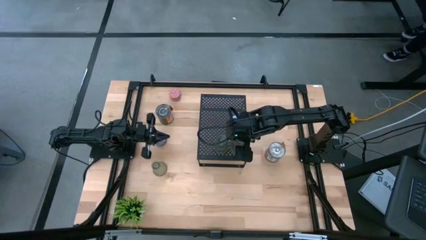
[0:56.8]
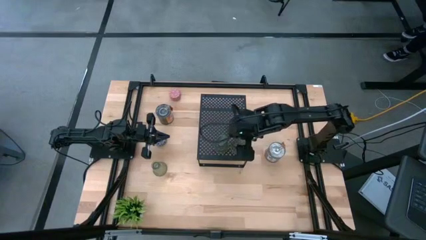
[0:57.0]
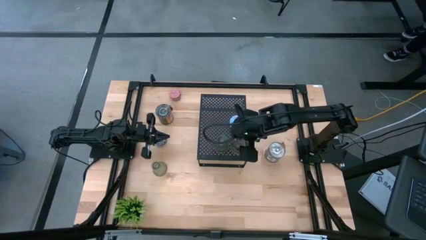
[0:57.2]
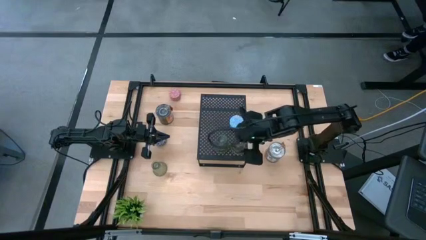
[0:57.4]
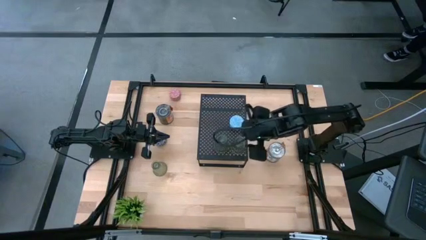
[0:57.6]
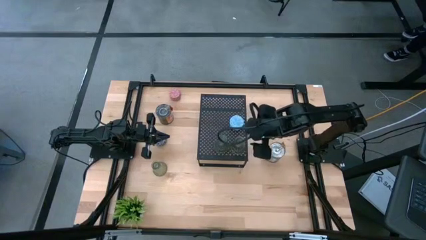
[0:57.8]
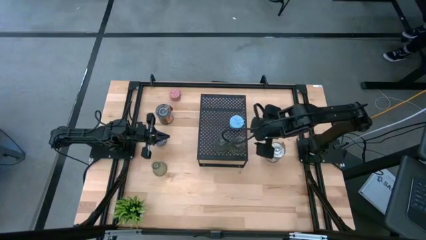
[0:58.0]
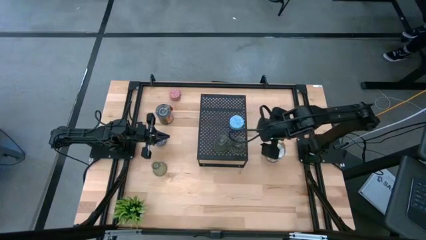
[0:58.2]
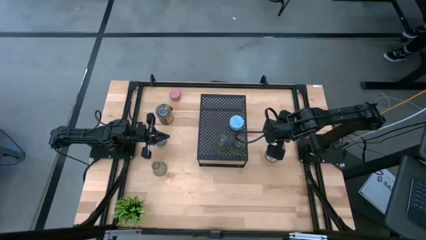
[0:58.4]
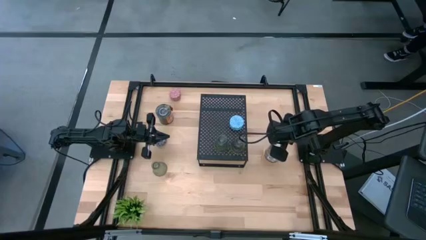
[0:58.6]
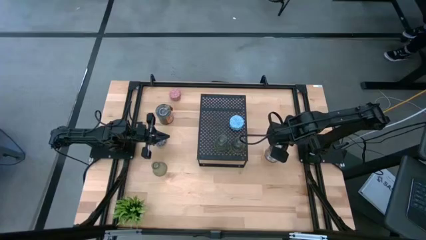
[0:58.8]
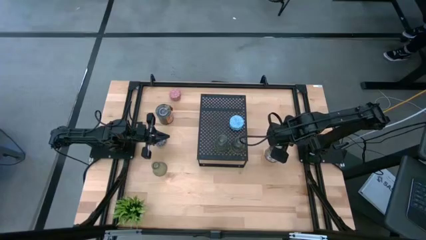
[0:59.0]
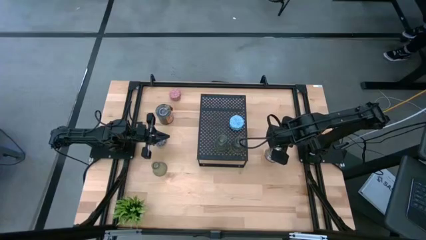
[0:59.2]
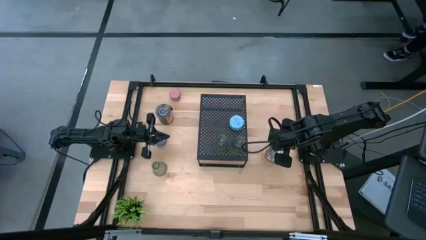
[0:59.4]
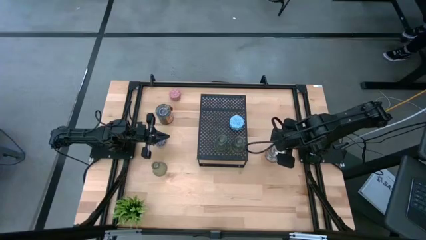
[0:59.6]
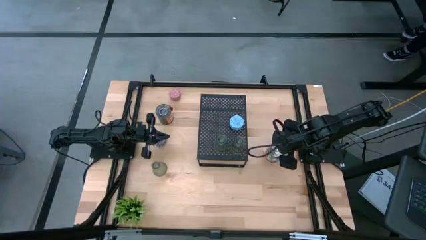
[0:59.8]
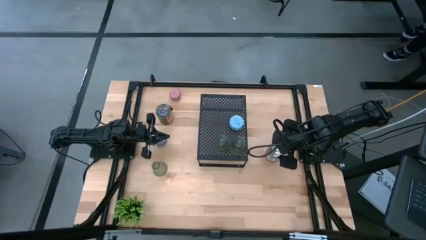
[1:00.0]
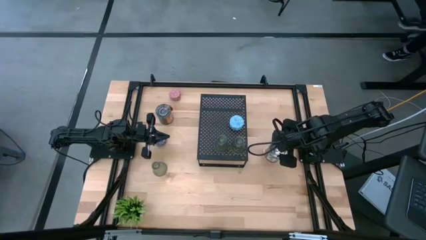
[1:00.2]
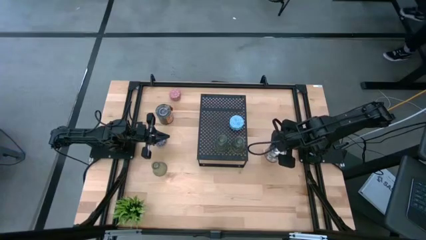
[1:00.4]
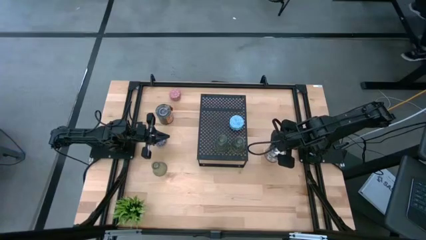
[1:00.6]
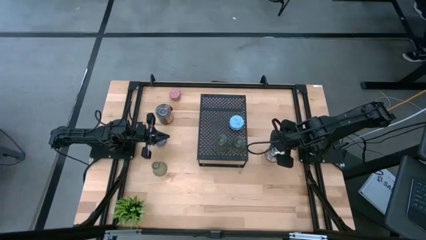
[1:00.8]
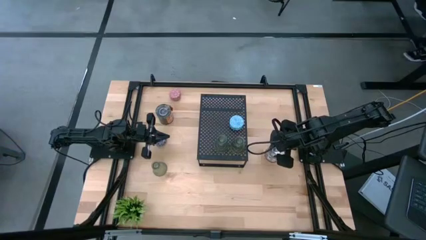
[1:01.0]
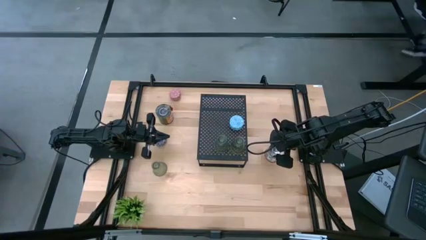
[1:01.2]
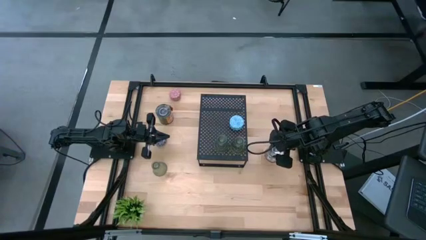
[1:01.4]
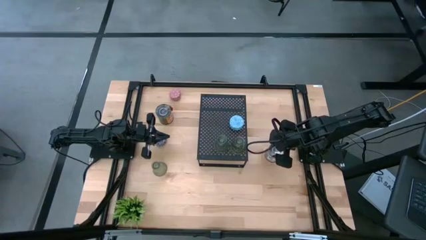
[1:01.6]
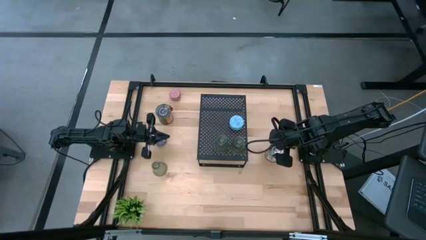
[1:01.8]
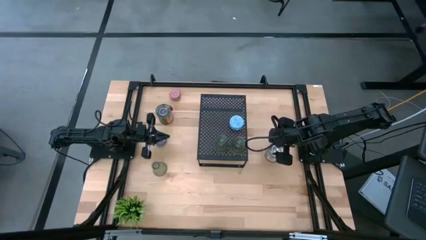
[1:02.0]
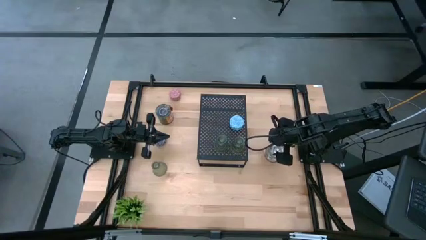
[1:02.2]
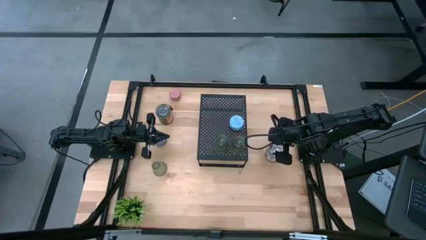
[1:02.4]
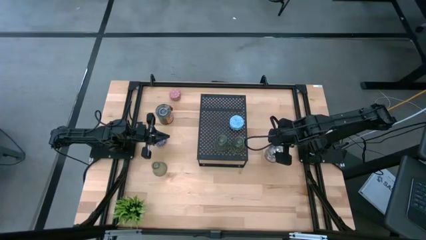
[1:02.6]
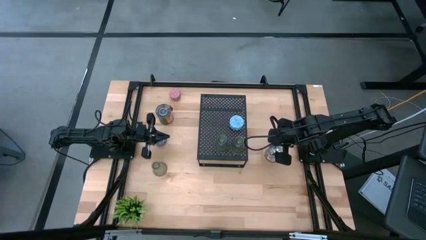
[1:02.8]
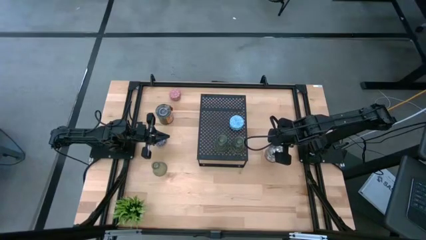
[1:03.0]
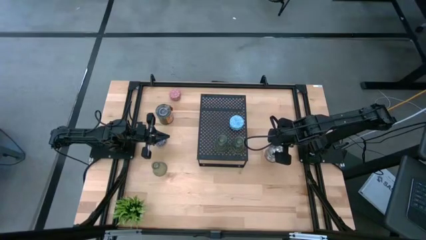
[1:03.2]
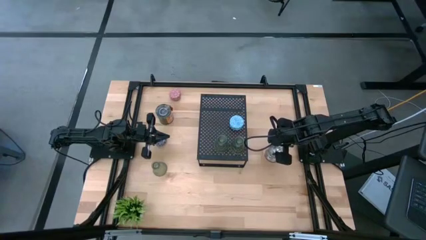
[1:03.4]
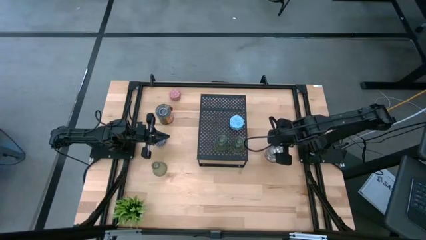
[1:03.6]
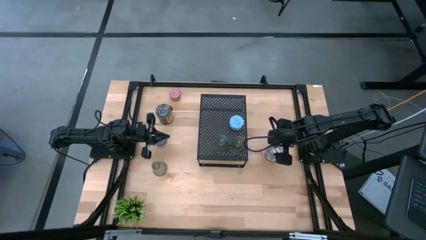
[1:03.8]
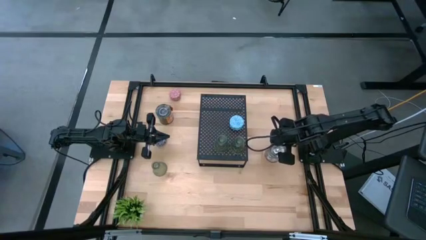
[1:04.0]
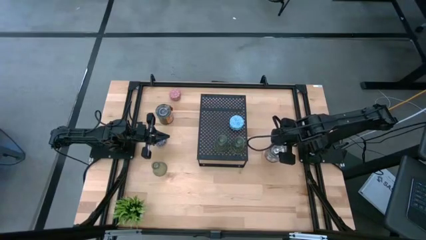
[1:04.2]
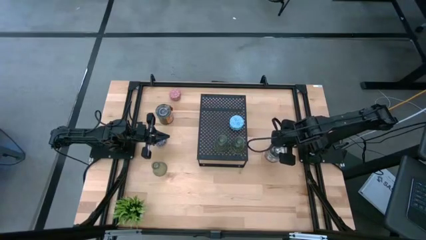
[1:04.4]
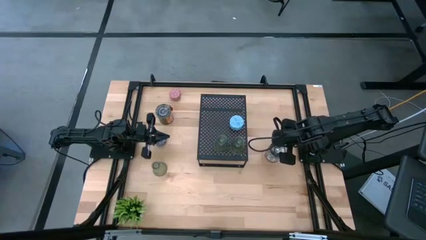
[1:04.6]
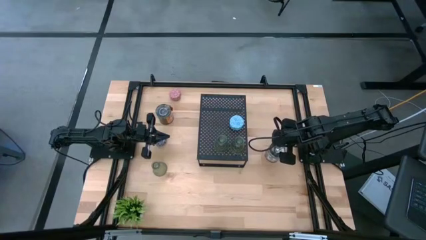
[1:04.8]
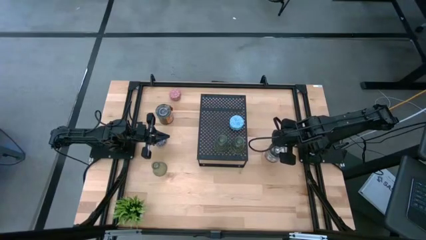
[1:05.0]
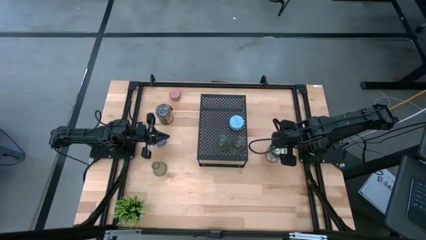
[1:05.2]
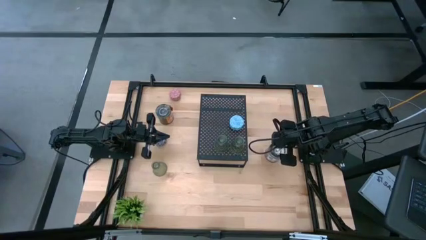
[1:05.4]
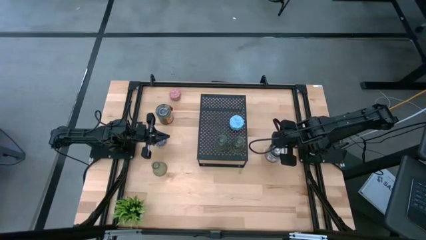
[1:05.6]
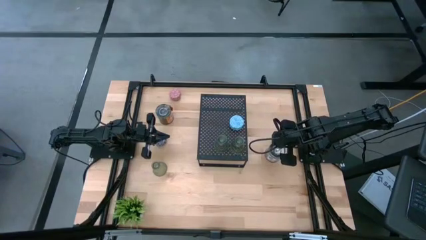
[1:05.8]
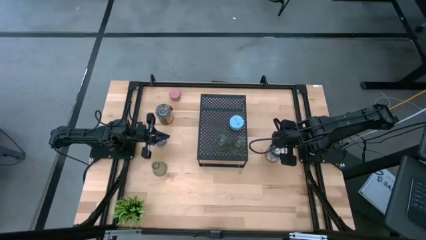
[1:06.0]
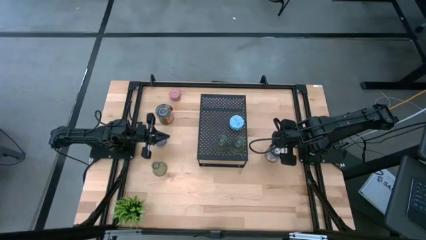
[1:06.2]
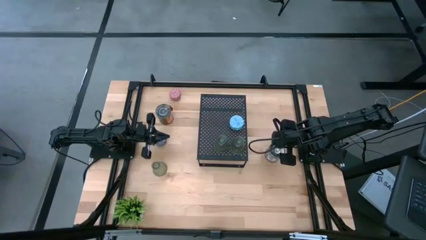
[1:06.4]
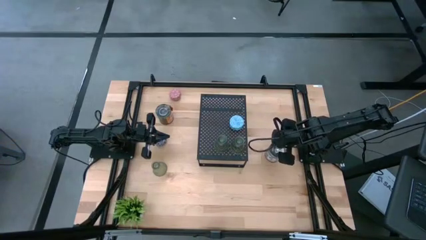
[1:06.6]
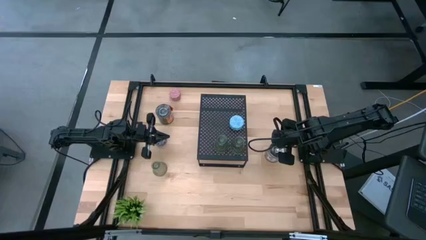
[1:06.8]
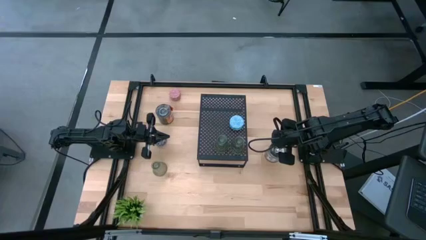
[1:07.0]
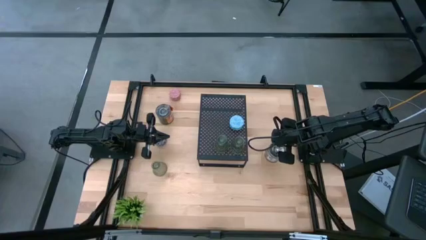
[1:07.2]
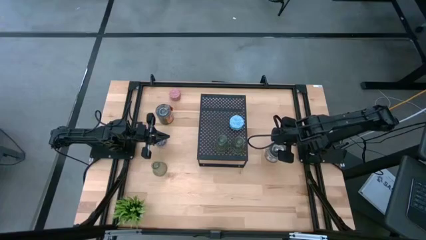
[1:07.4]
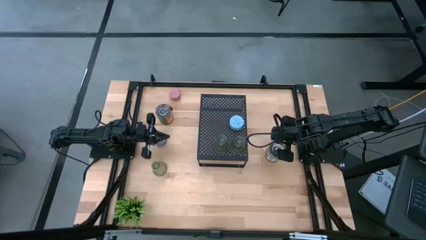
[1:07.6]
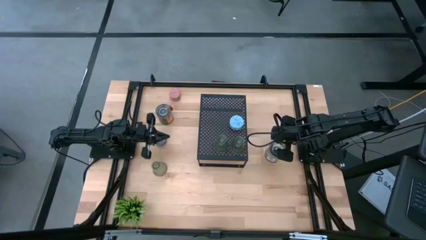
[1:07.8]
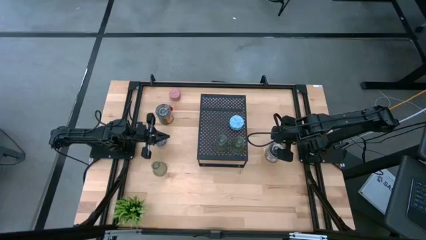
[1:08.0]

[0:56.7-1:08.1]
Task: Pick & Place candle stick holders
Put the brown scented candle on the shelf
